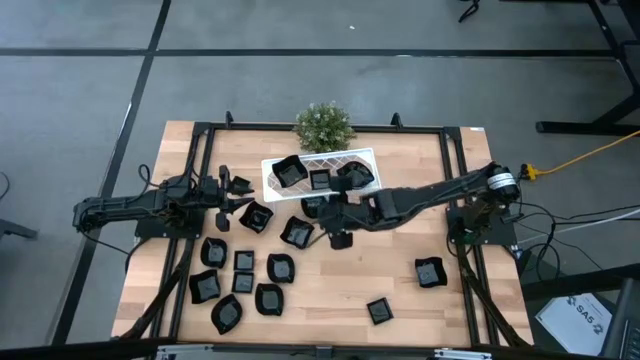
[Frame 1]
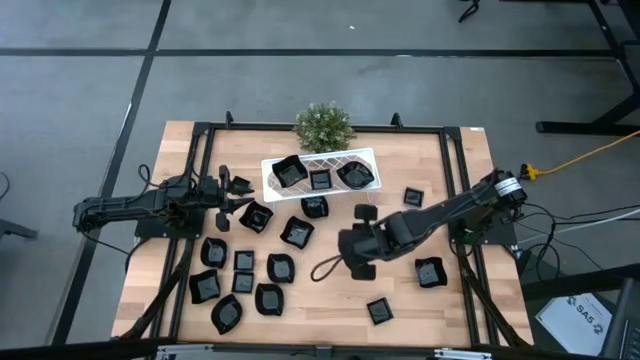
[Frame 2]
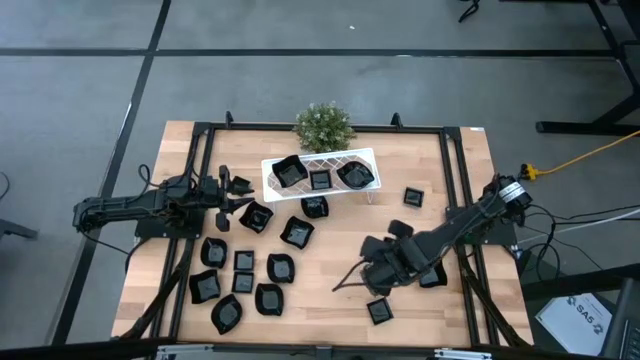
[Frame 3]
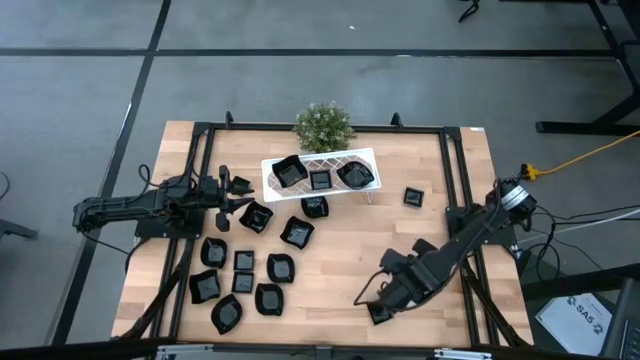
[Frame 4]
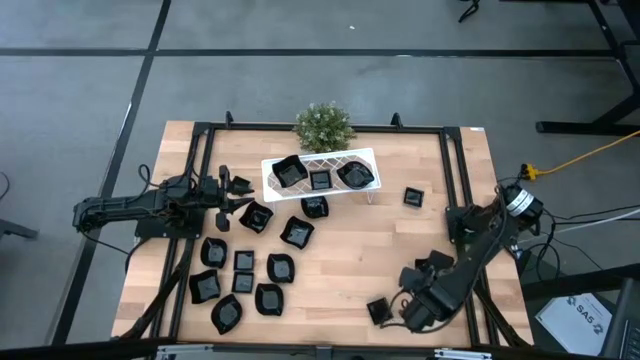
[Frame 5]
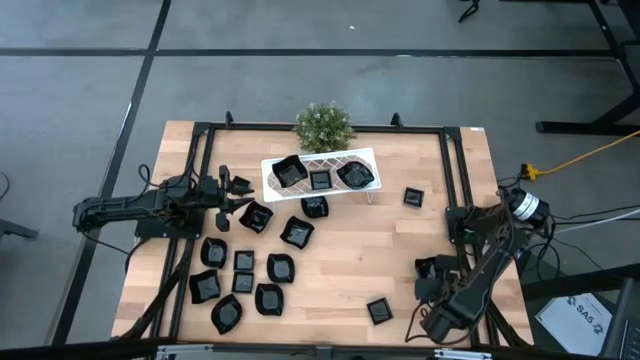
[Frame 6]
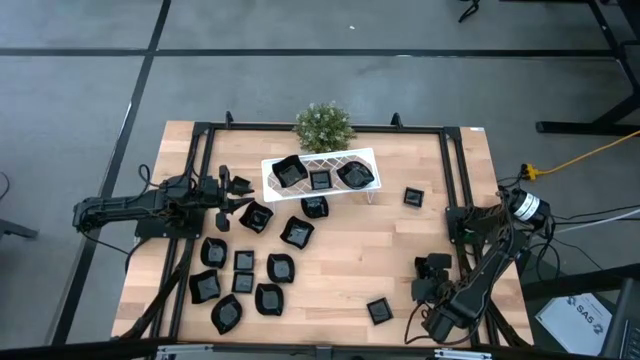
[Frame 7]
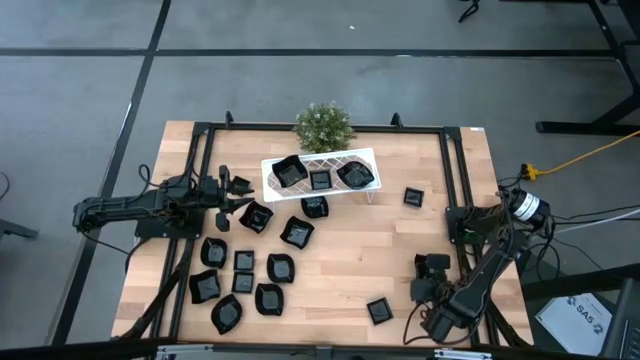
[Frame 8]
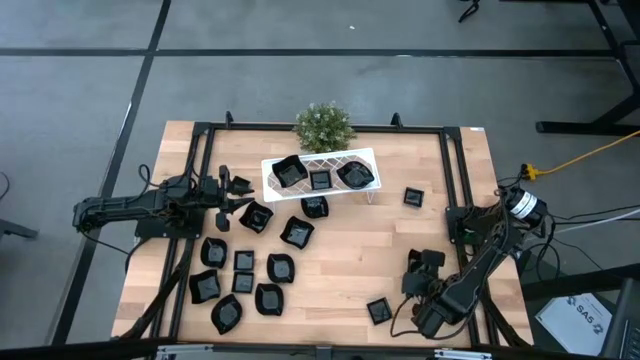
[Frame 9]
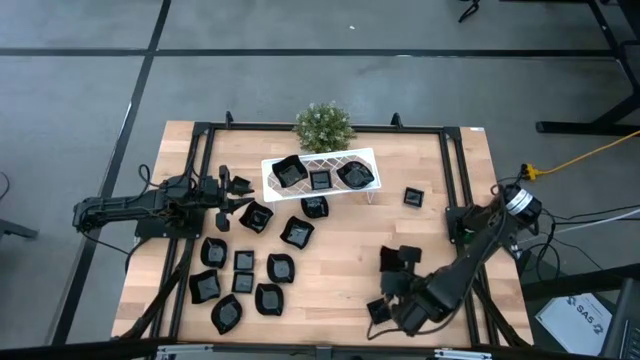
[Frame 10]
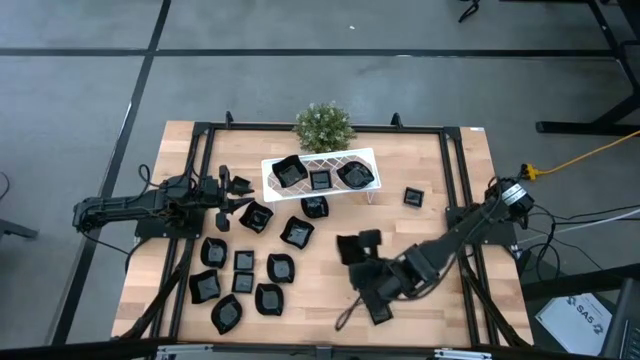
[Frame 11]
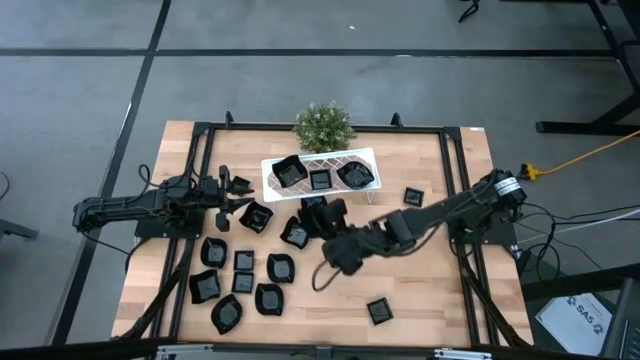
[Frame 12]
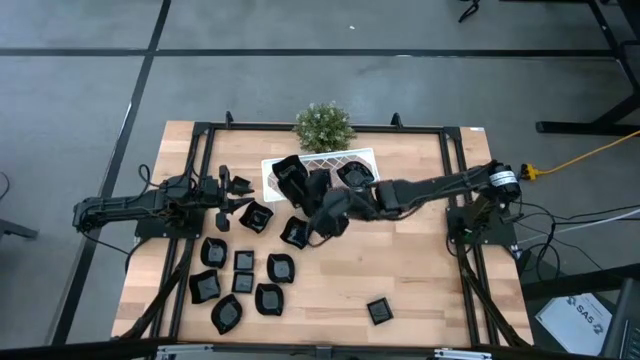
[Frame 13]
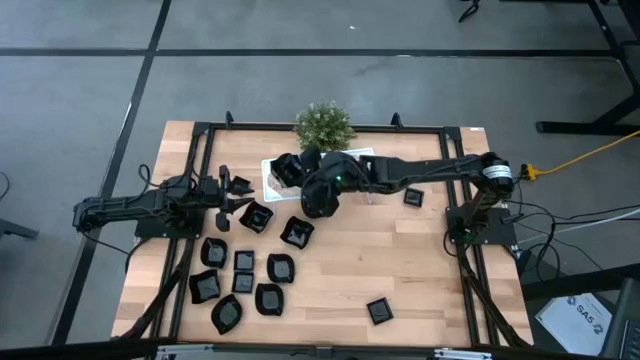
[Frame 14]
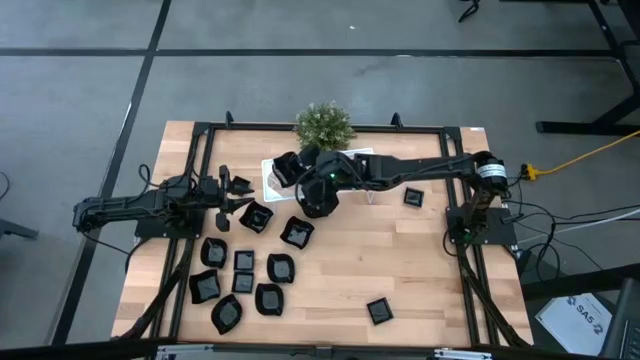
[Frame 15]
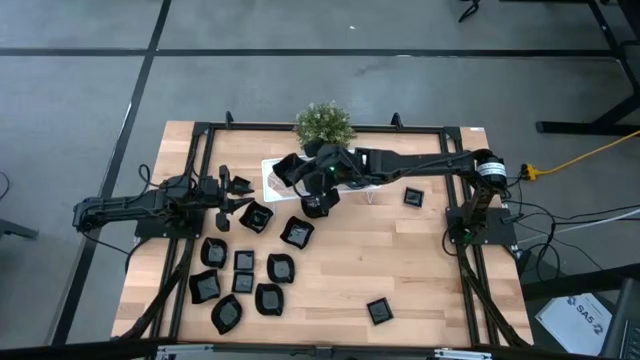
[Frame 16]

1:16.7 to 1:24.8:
Task: Pick & Place Mini shaped plates
Stack the distorted square plate on top of the distorted square plate on the shelf

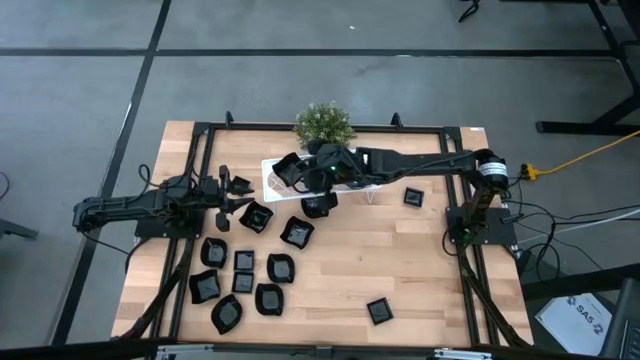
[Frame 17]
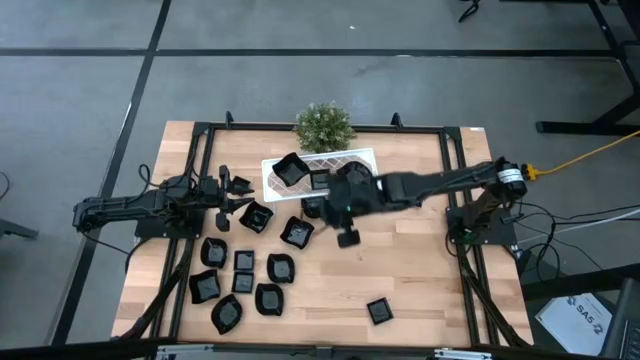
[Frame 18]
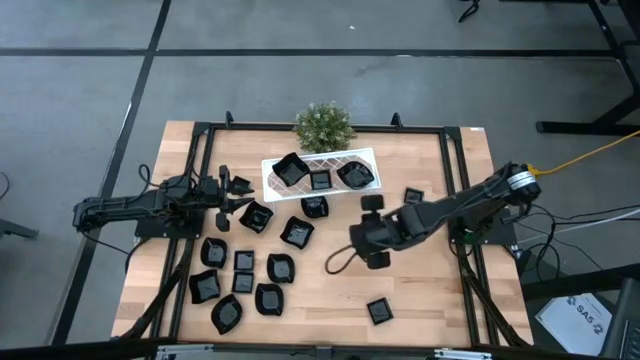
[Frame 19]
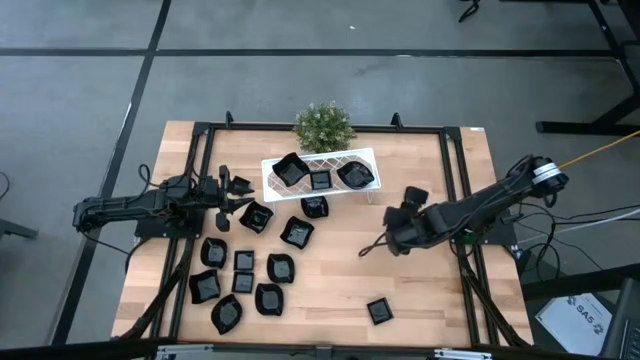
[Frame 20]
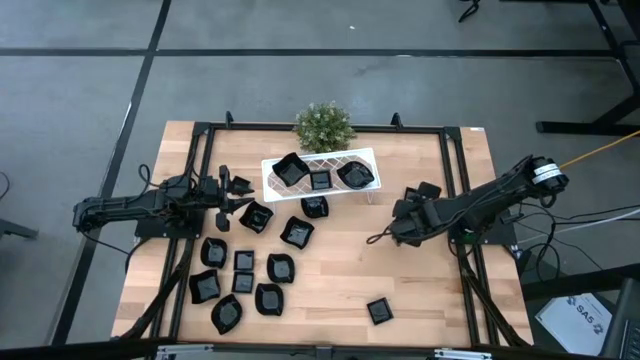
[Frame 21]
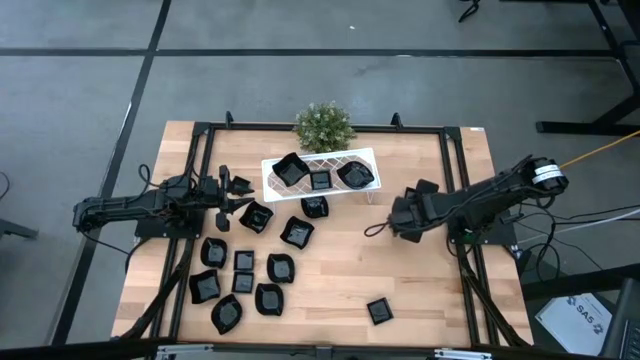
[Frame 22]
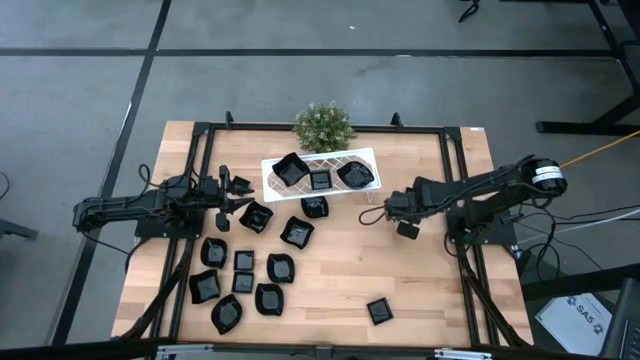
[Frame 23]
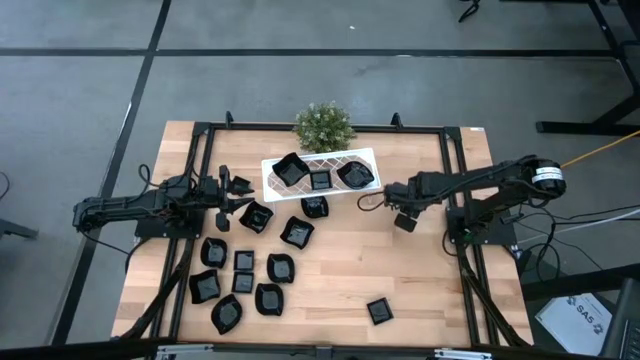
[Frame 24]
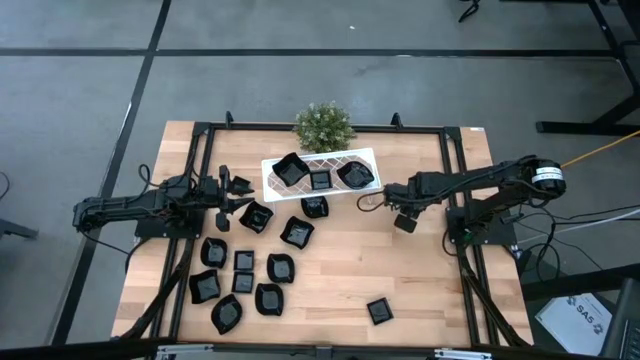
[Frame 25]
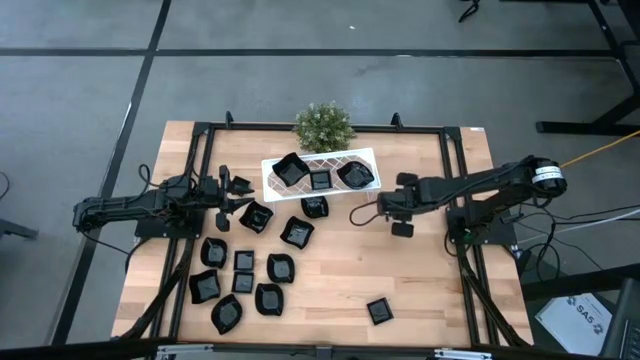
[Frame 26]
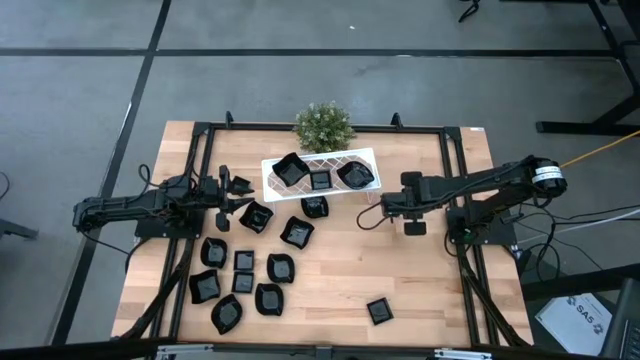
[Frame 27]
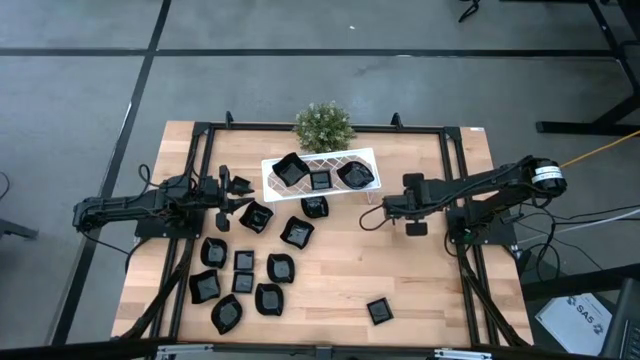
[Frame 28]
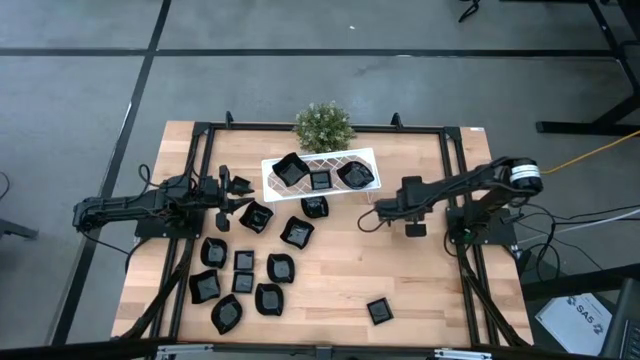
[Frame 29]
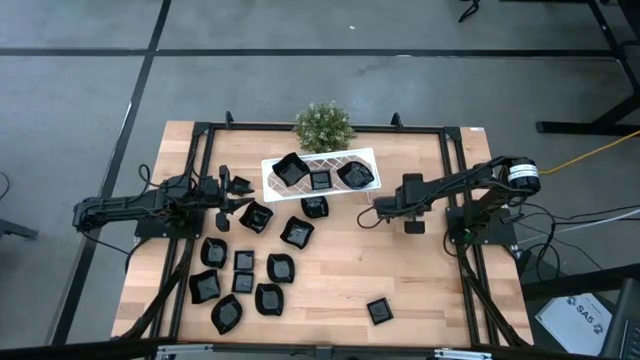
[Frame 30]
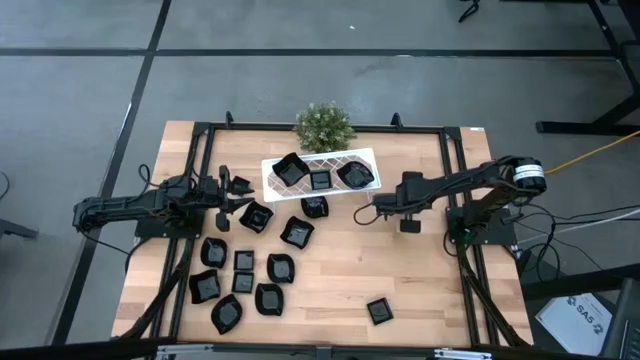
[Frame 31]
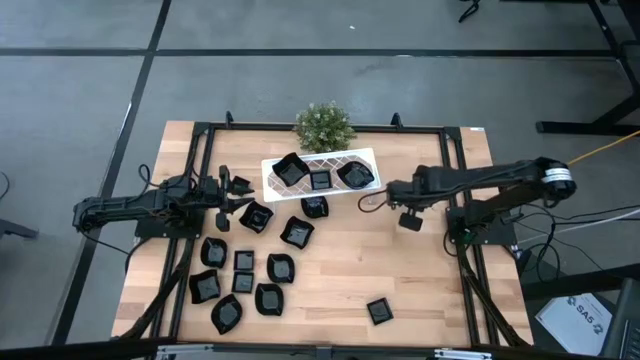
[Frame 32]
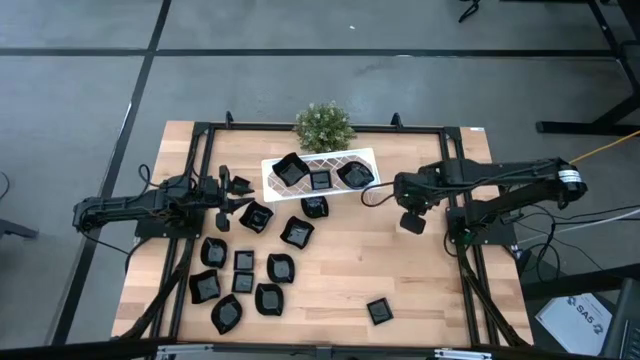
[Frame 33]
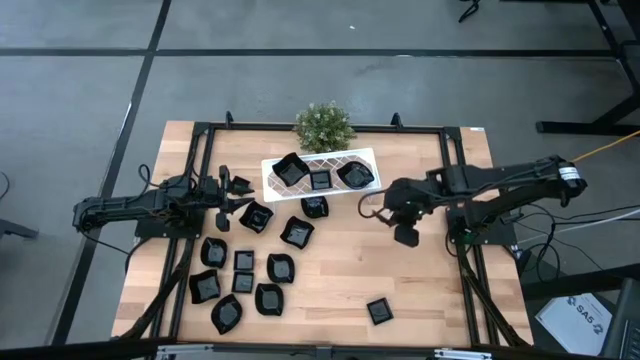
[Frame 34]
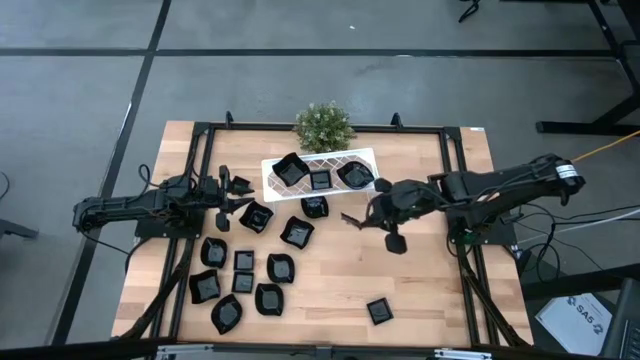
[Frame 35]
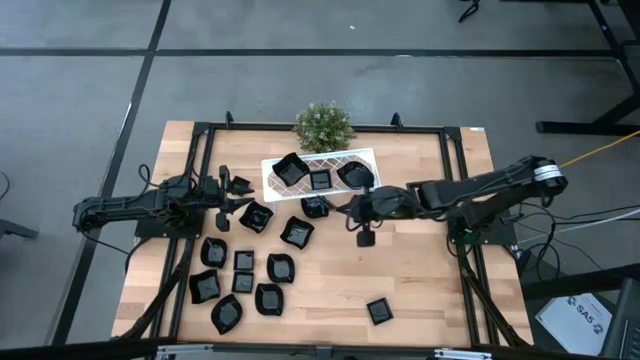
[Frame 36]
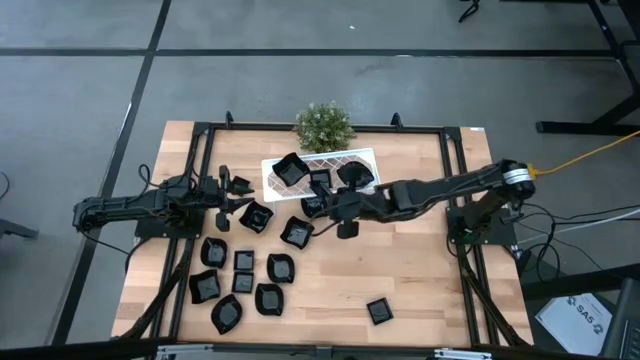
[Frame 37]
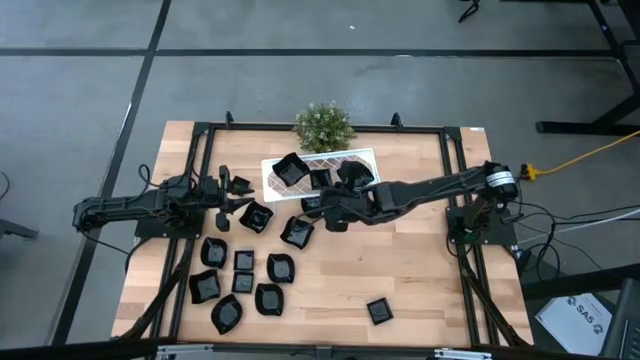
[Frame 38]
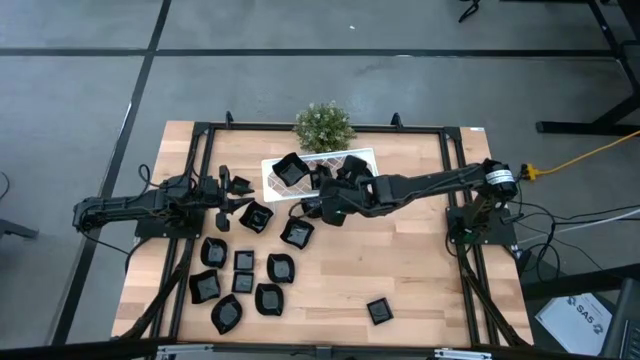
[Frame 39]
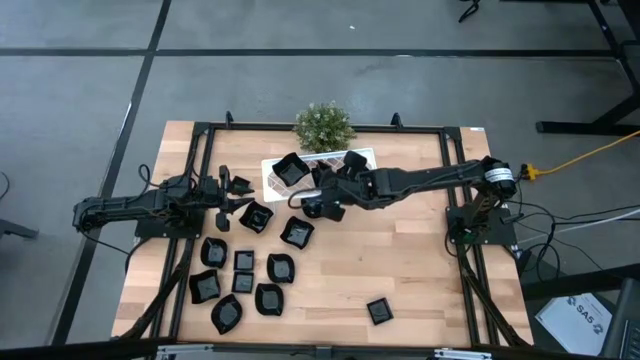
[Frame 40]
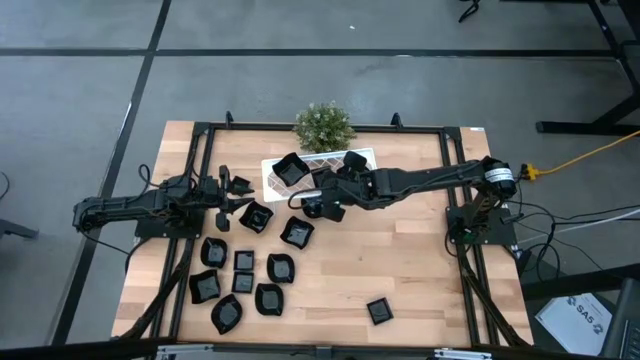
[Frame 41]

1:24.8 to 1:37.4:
Stack the square plate on top of the square plate on the shelf

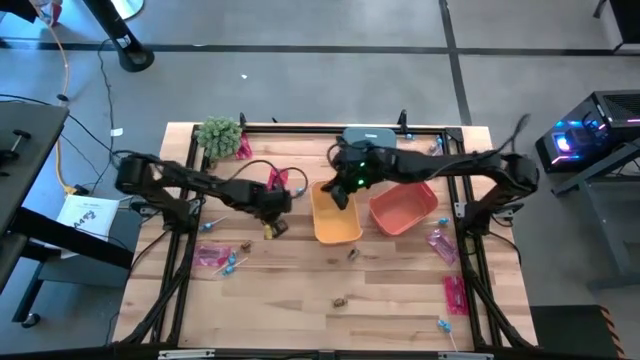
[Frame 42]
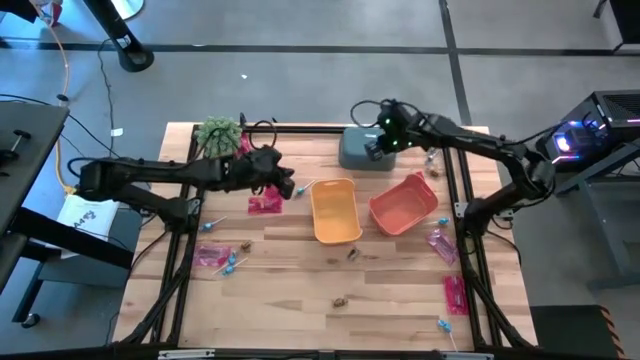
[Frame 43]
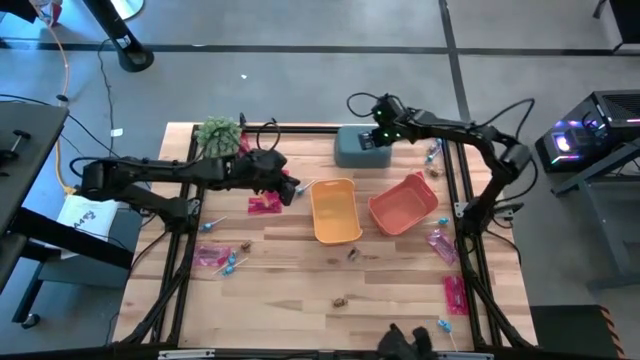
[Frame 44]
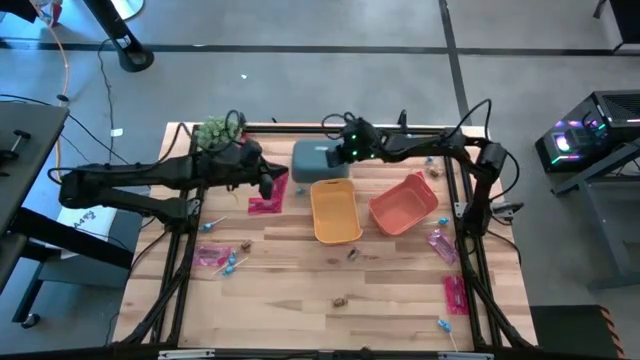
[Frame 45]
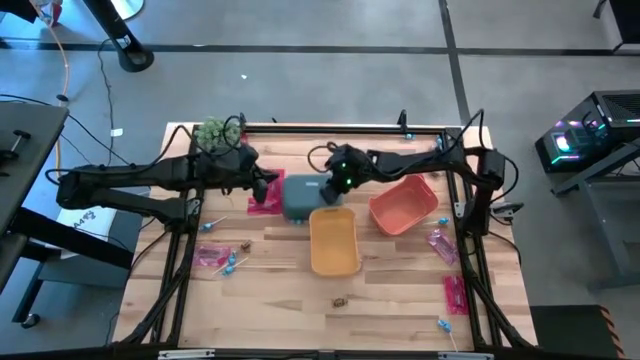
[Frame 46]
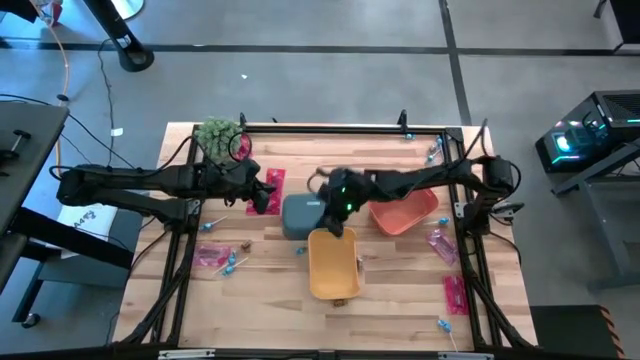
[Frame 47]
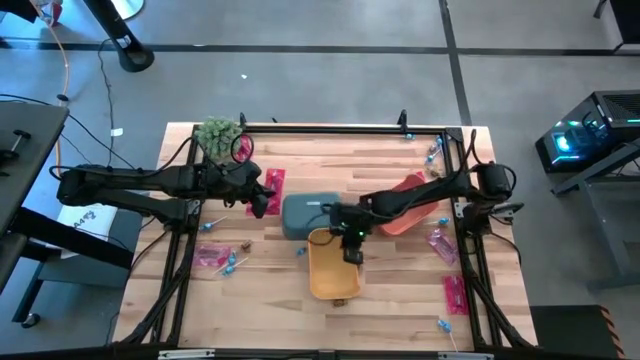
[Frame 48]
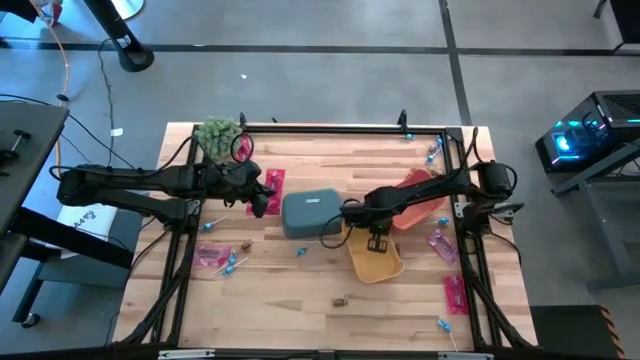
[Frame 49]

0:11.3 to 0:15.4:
Task: Sort candy
Adjust the yellow bin
